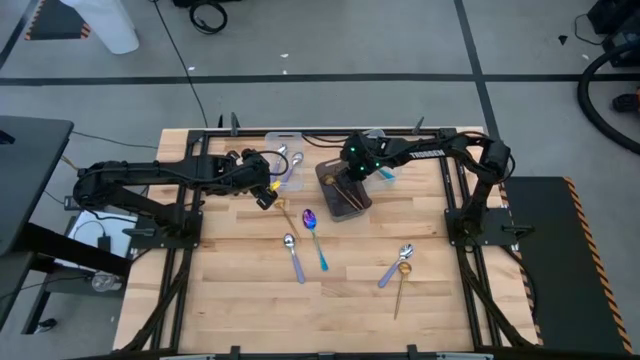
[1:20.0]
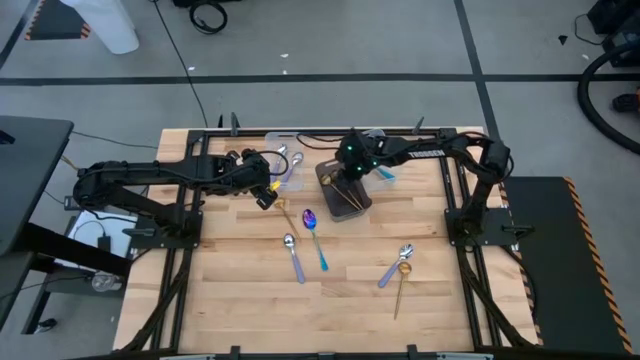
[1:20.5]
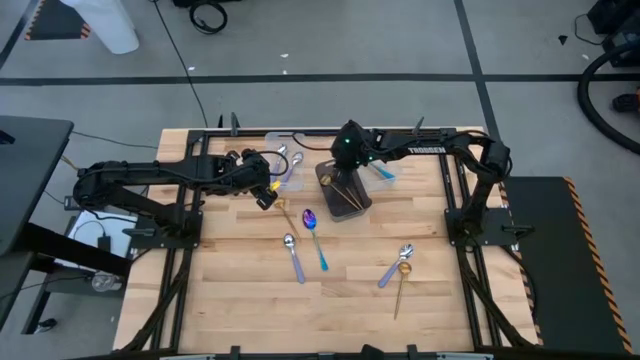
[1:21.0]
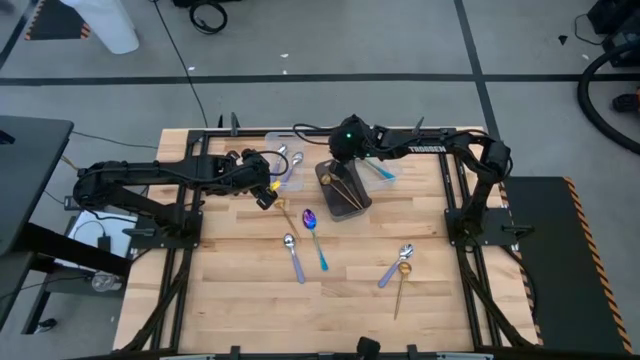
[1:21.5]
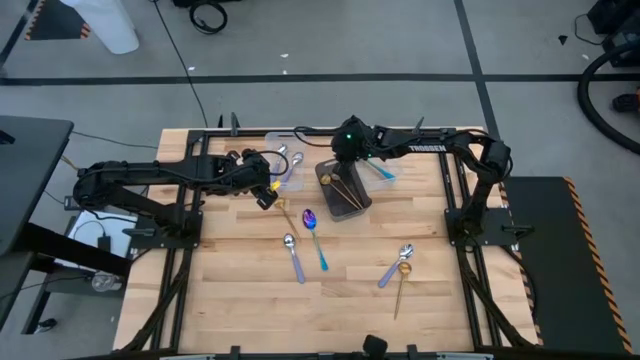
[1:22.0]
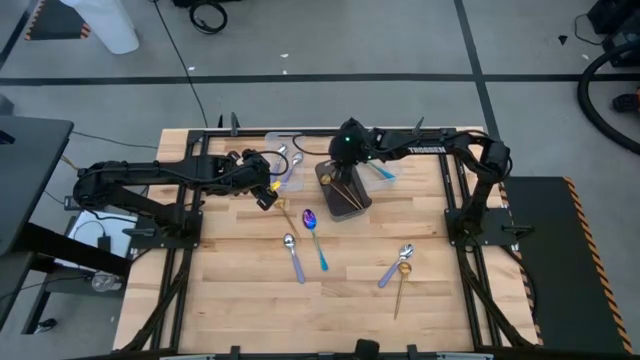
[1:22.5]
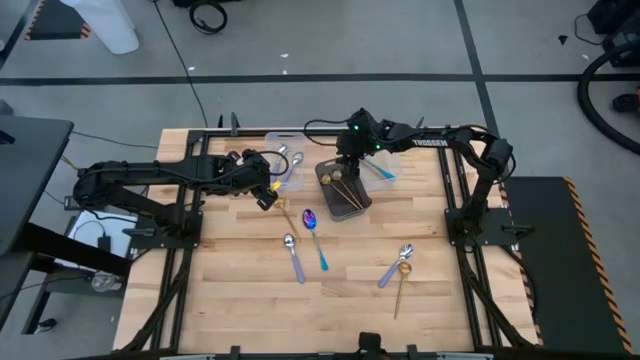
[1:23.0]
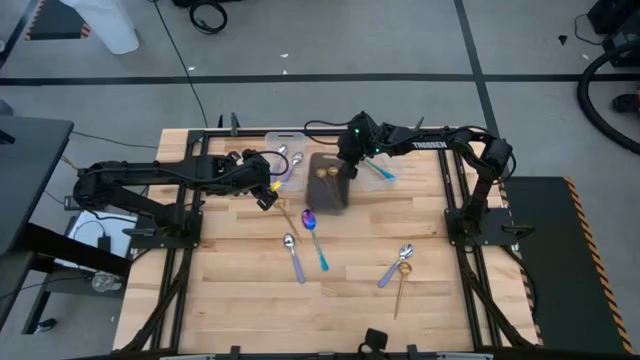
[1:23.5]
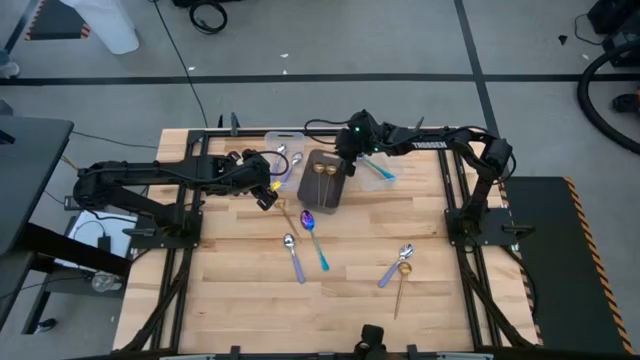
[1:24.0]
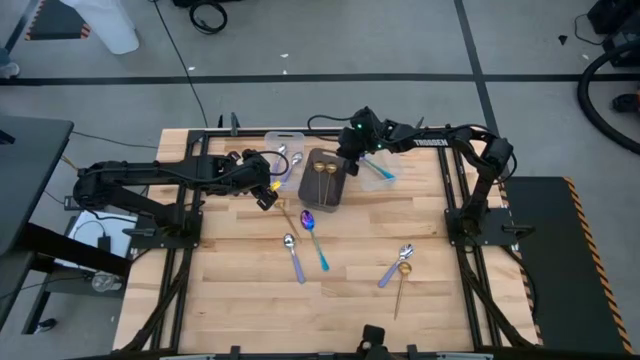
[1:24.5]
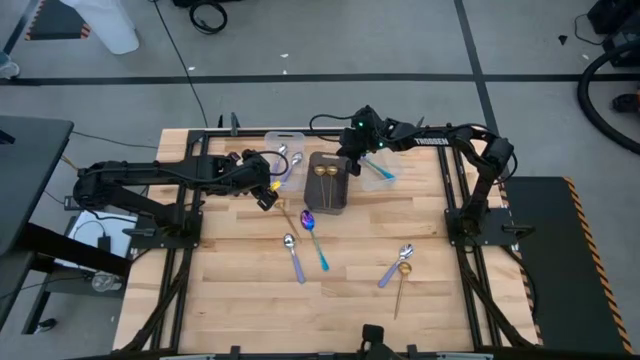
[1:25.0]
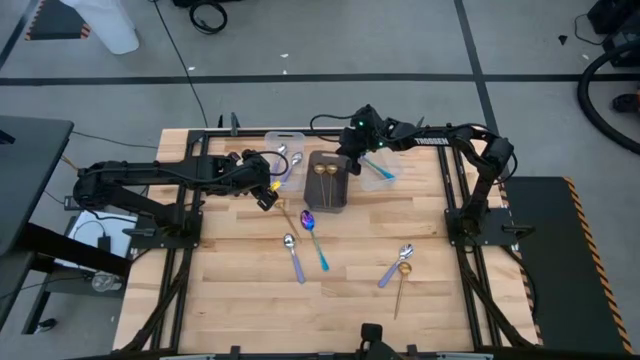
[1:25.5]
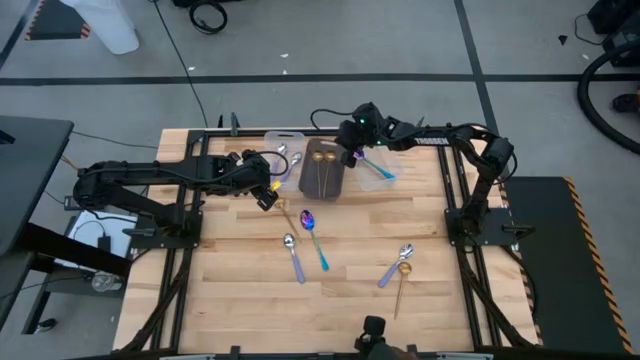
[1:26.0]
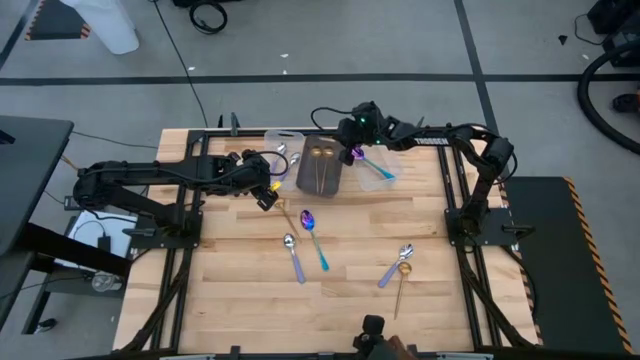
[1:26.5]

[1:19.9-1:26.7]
Task: Sort silverware by color (type)
Adjust the black bin

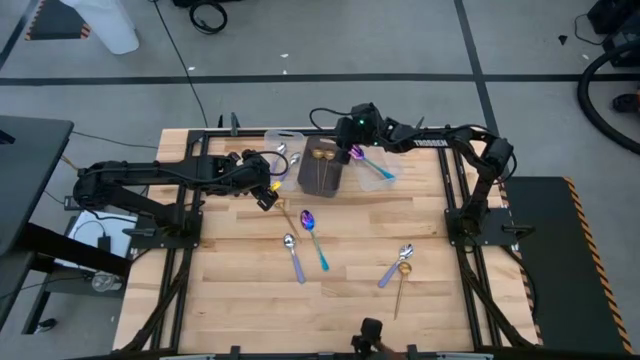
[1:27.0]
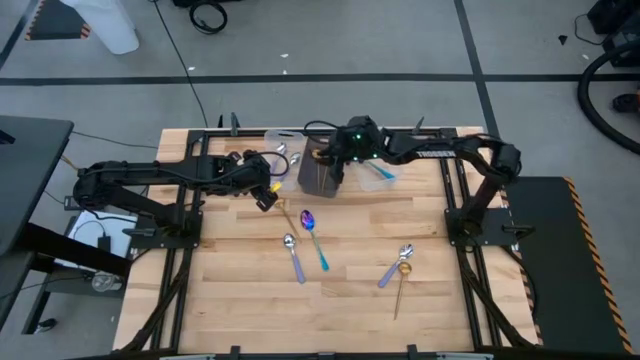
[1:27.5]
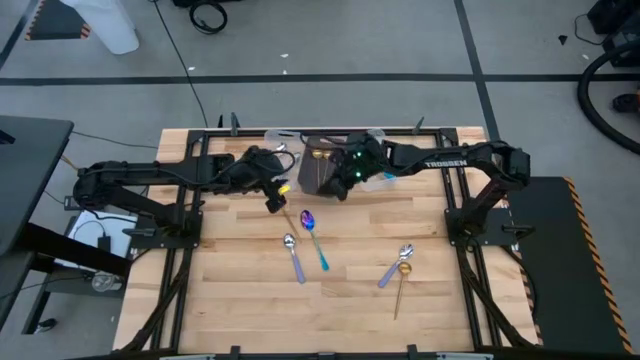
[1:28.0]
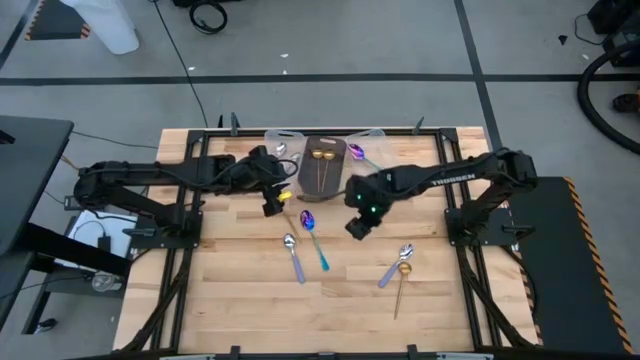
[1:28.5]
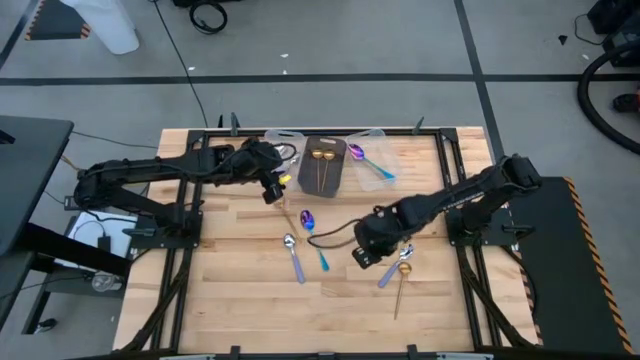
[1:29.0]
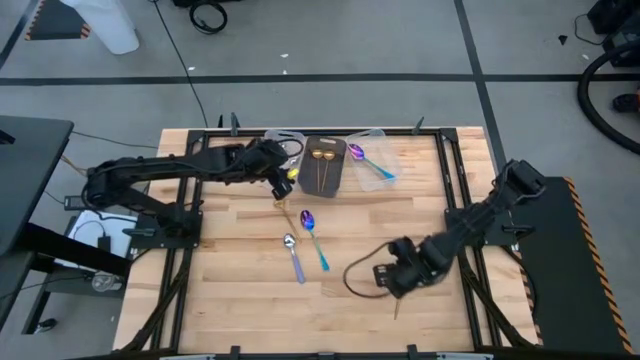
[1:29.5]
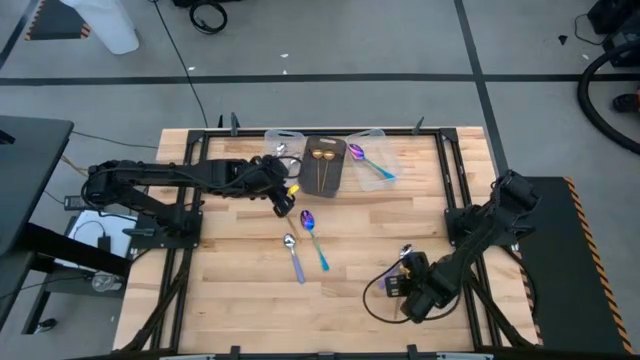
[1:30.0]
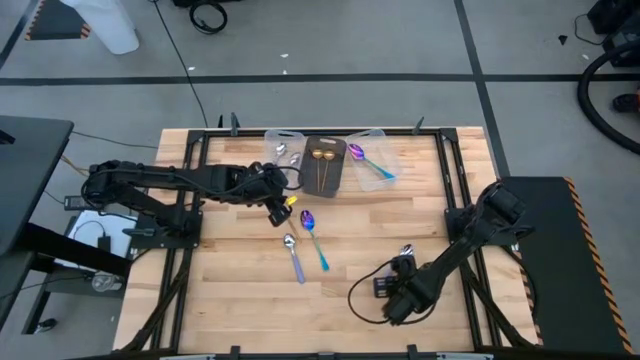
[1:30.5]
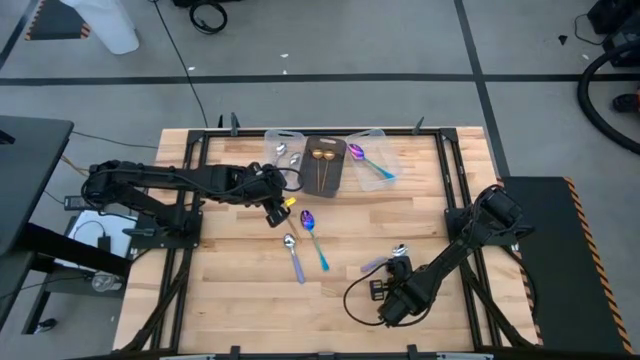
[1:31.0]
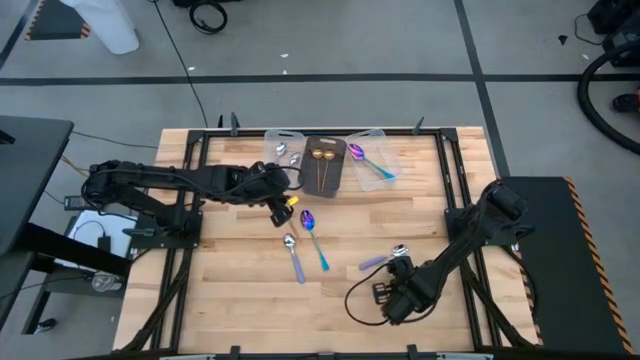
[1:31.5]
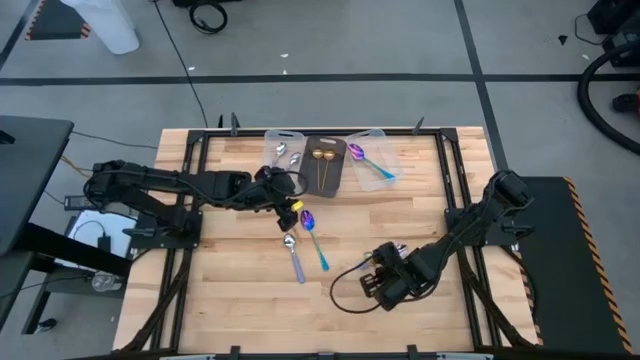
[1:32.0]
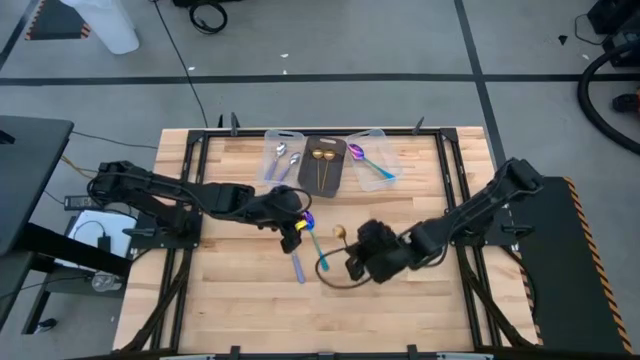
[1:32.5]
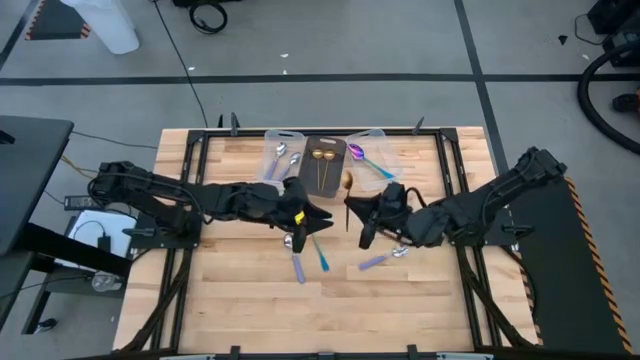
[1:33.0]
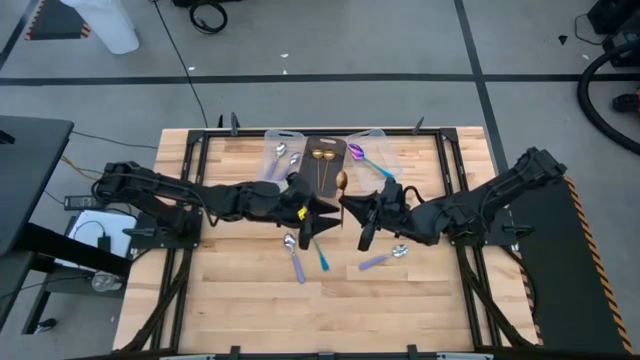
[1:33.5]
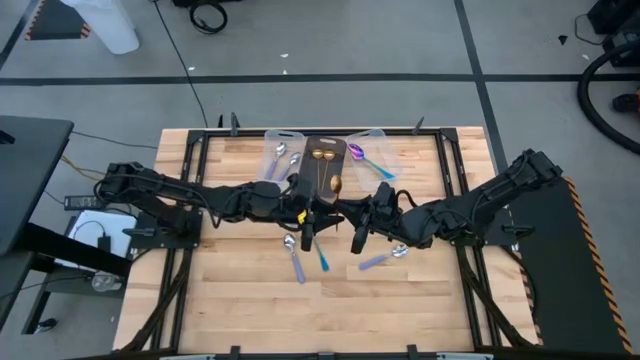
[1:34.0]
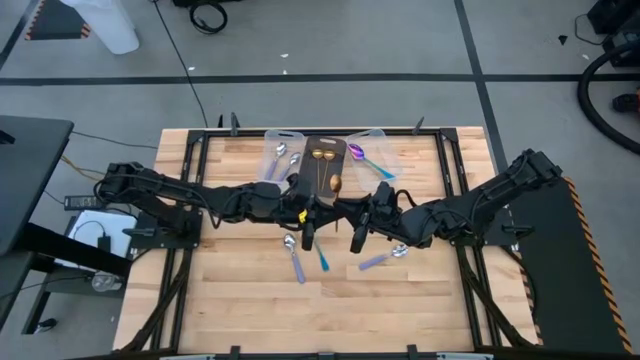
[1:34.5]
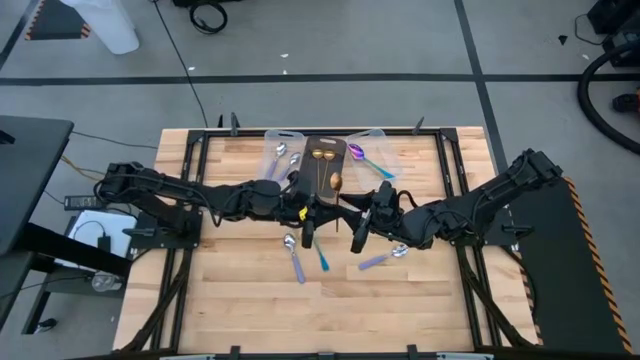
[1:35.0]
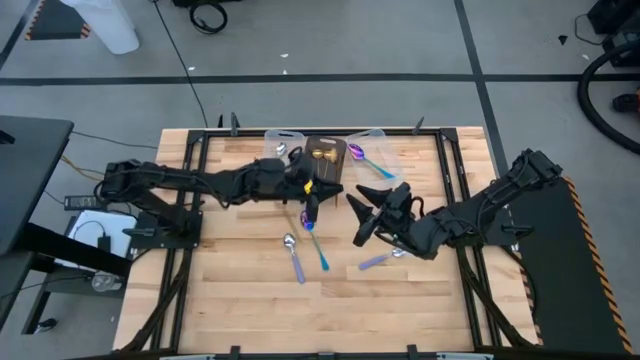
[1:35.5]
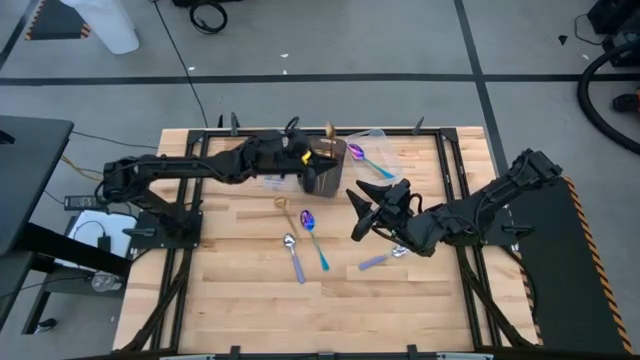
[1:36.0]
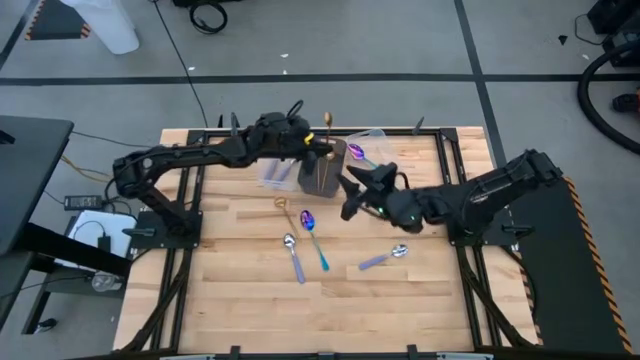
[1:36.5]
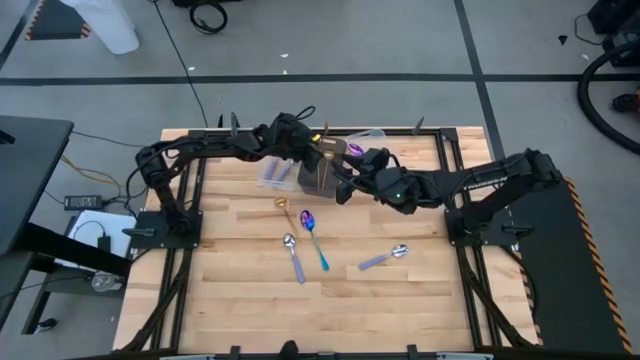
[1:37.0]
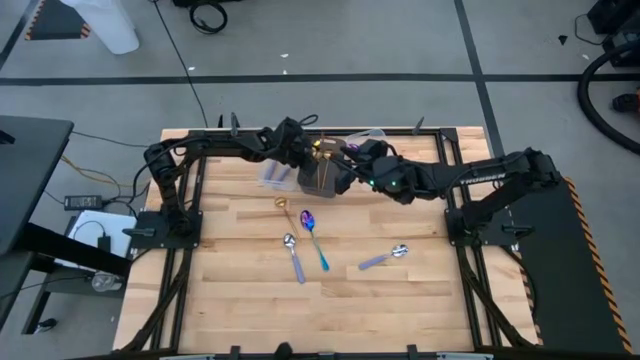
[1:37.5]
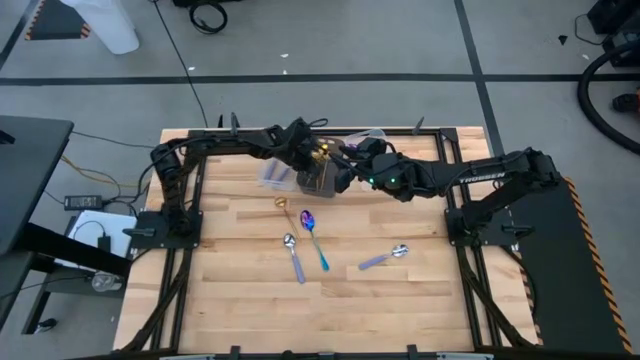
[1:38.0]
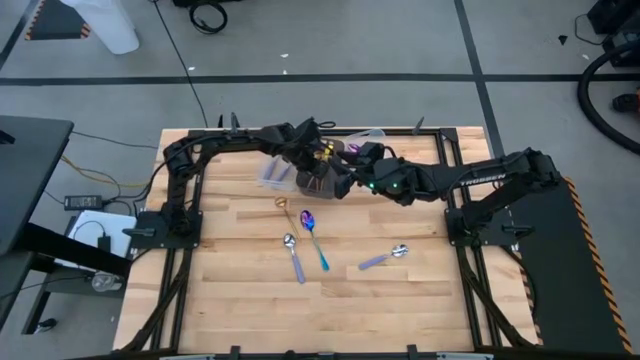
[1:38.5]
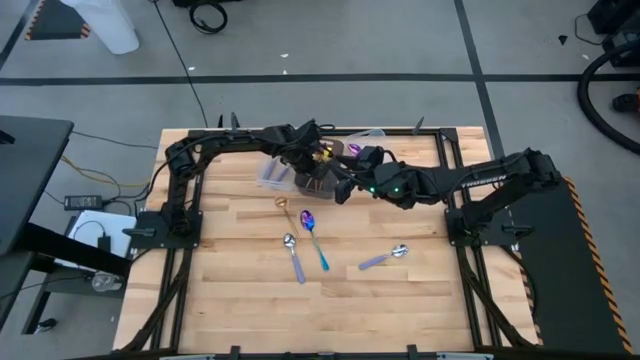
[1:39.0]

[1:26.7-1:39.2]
Put the bottom gold spoon into the black bin

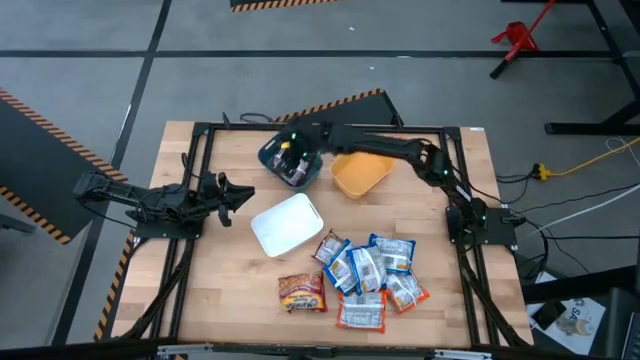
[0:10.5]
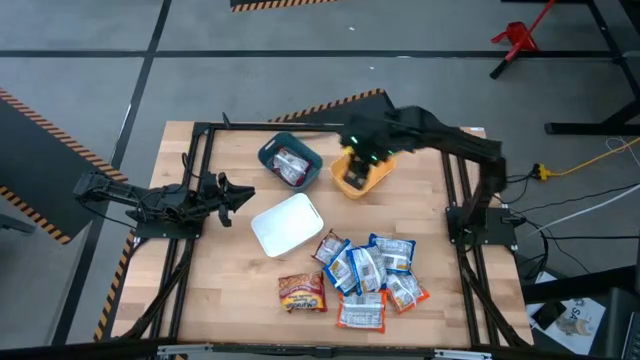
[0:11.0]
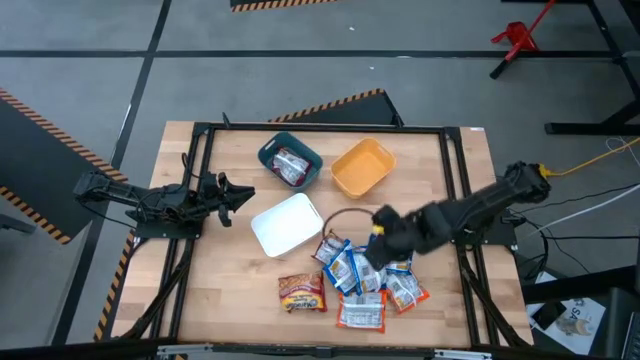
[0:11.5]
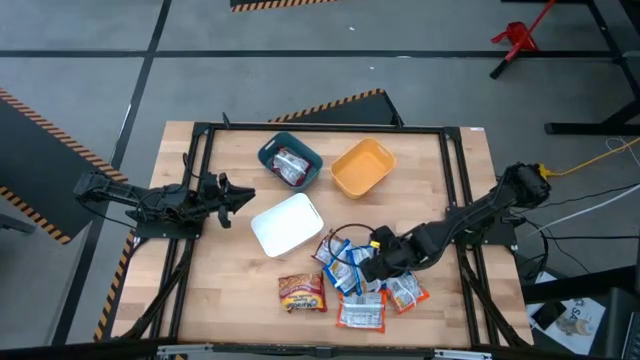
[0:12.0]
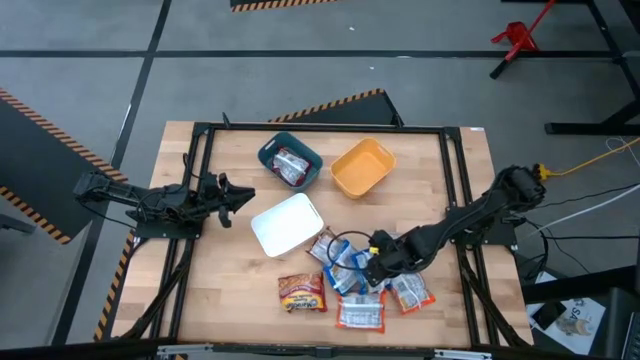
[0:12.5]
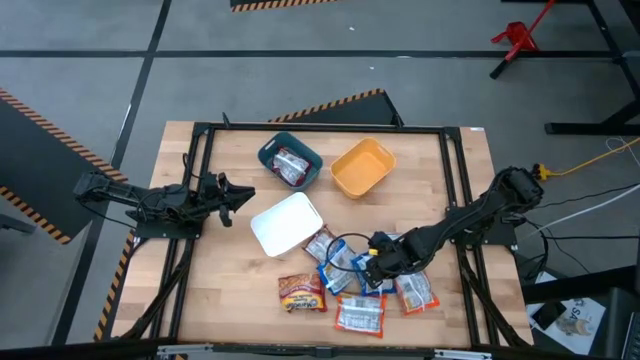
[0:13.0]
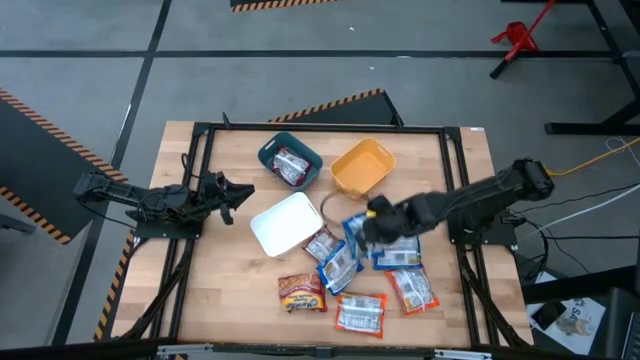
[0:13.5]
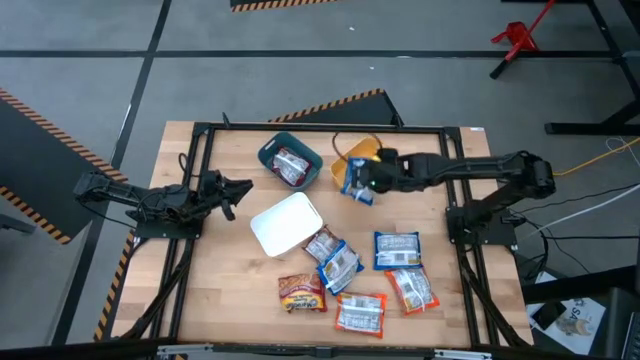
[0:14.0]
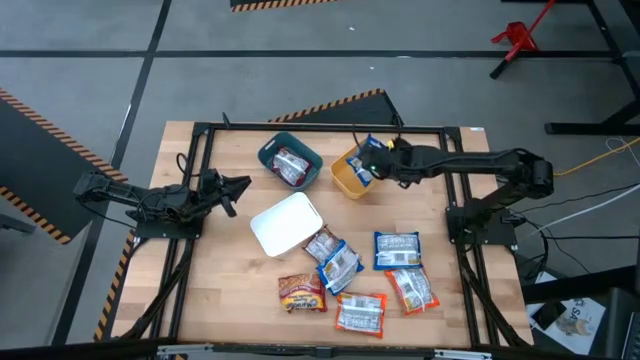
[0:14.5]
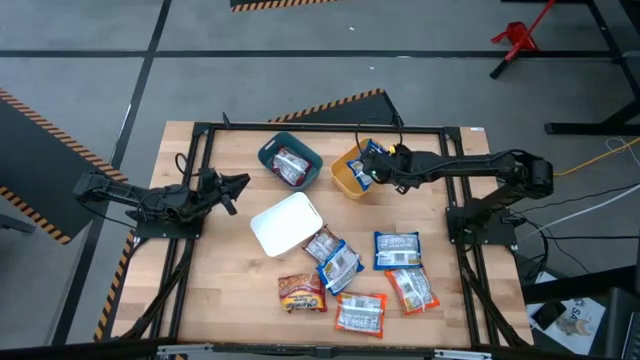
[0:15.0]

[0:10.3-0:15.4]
Task: Sort Maruchan noodles
Put the center blue noodle pack into the yellow bin
